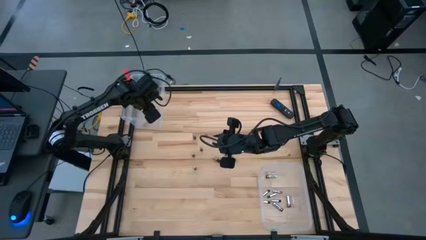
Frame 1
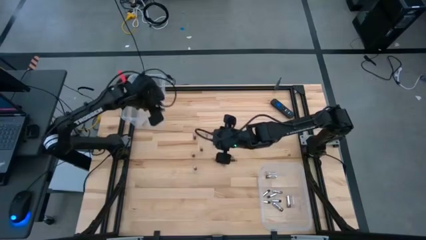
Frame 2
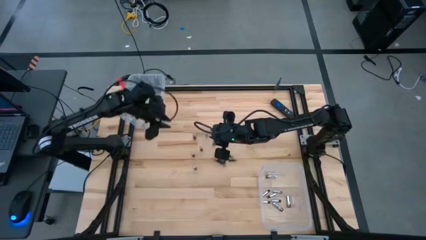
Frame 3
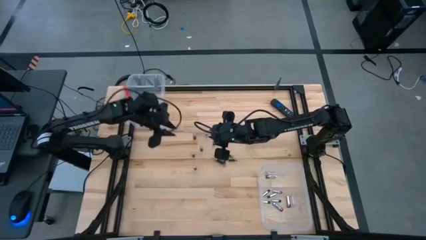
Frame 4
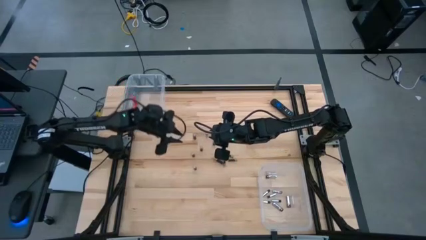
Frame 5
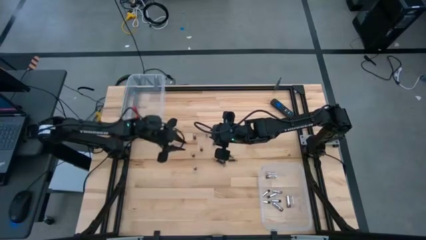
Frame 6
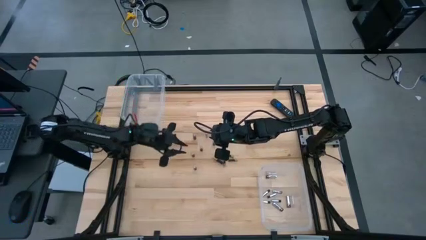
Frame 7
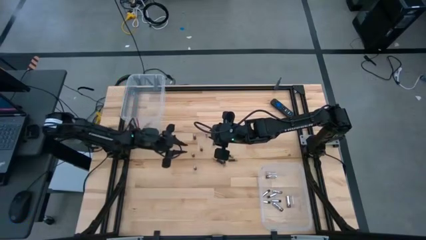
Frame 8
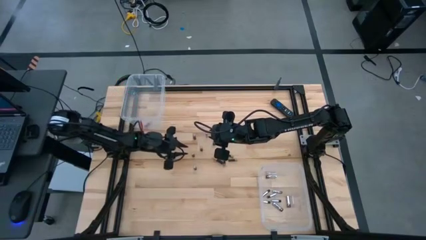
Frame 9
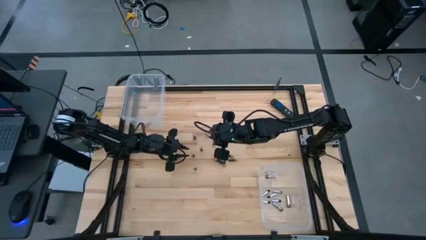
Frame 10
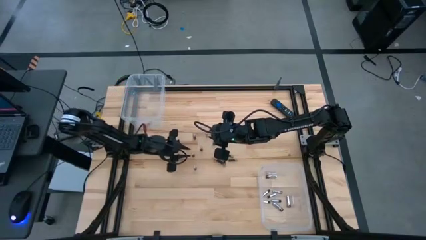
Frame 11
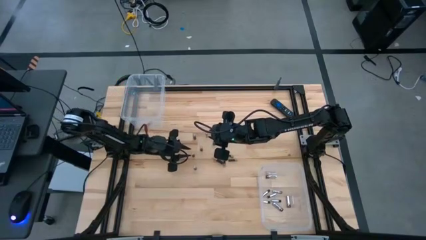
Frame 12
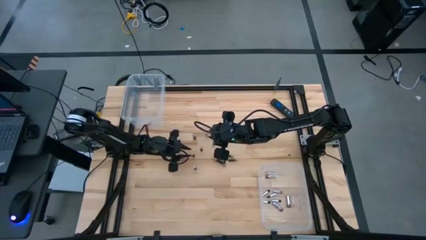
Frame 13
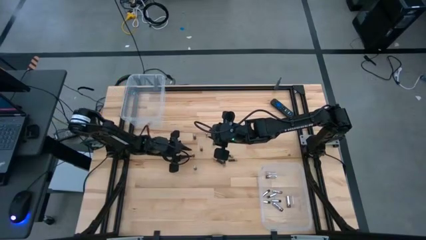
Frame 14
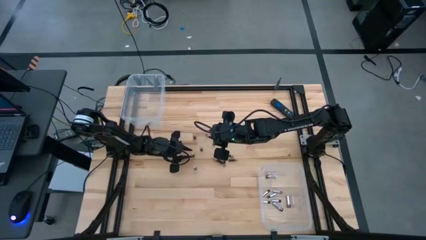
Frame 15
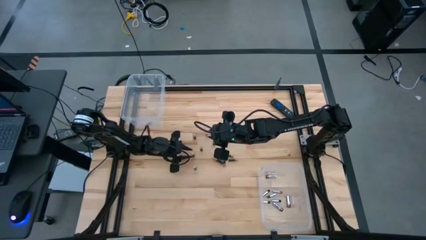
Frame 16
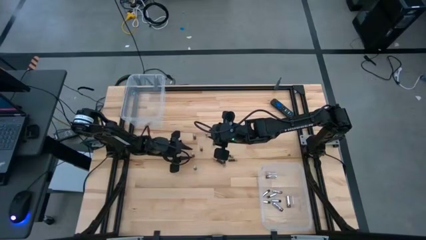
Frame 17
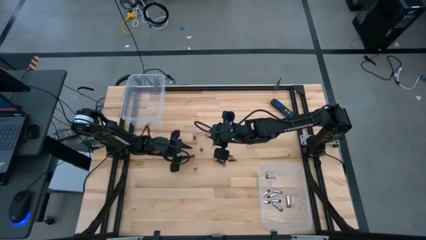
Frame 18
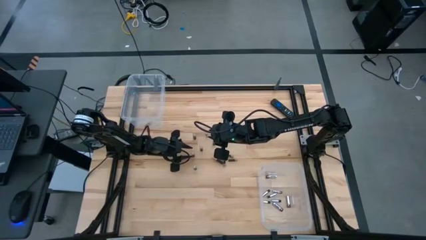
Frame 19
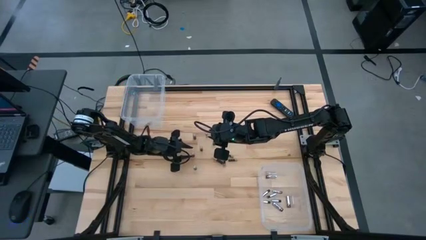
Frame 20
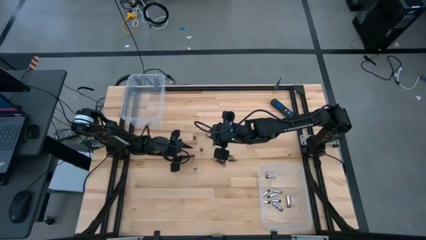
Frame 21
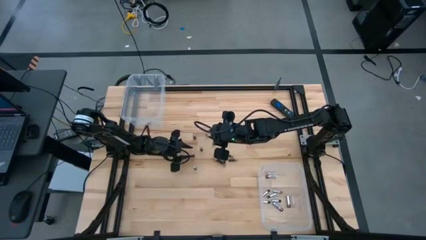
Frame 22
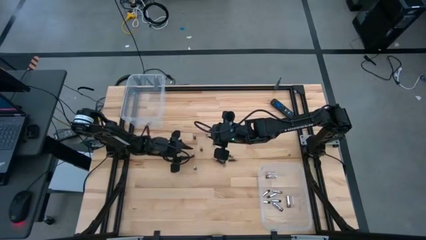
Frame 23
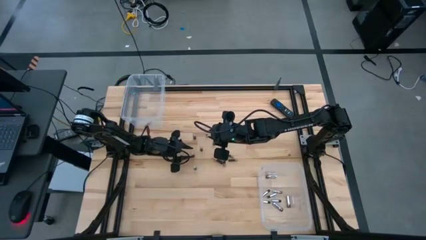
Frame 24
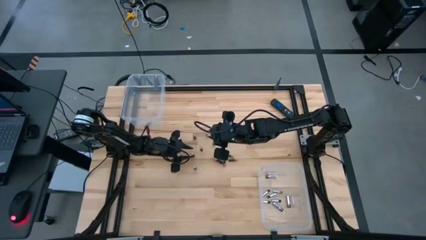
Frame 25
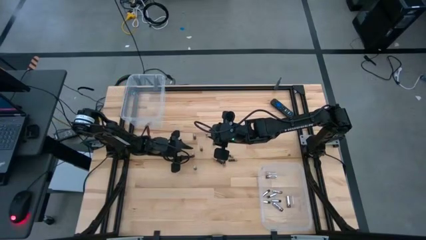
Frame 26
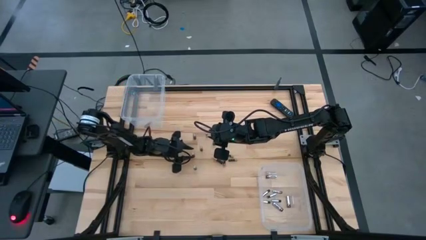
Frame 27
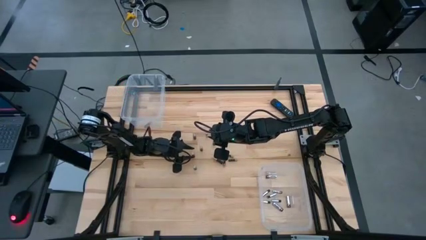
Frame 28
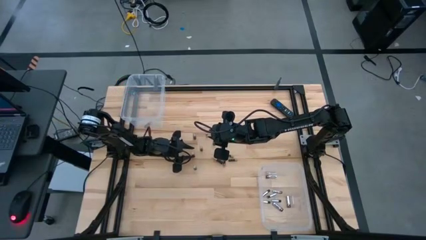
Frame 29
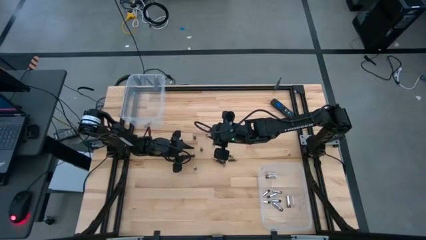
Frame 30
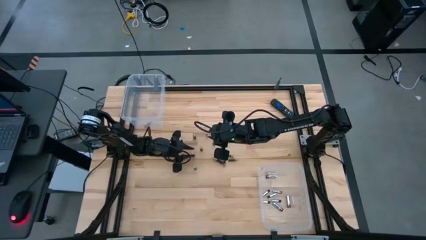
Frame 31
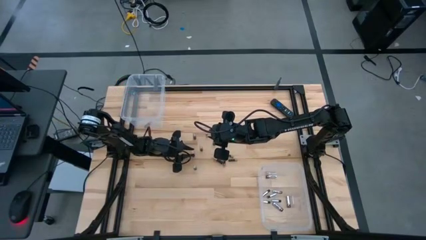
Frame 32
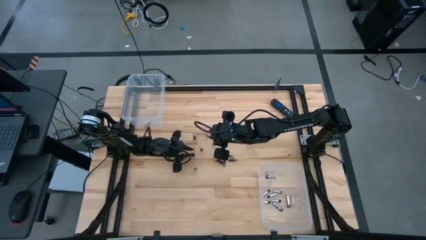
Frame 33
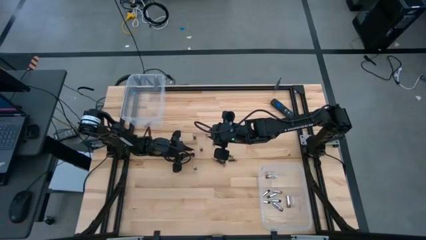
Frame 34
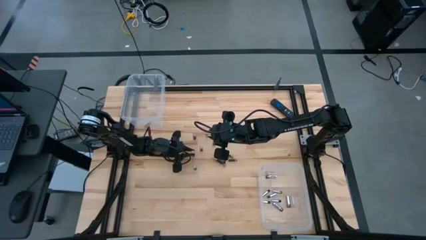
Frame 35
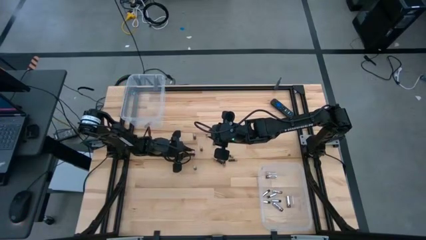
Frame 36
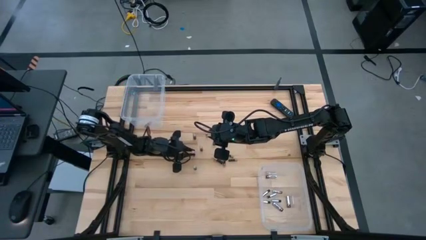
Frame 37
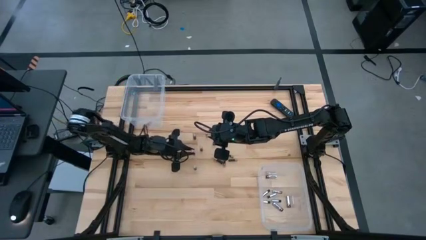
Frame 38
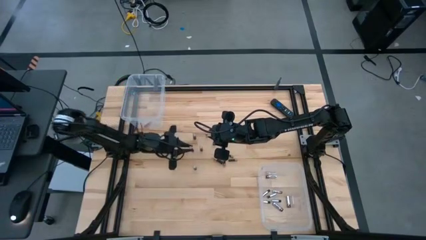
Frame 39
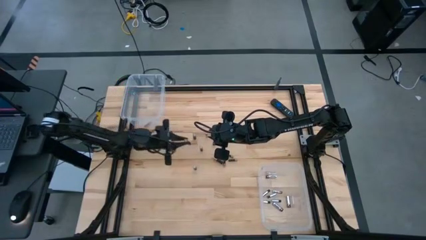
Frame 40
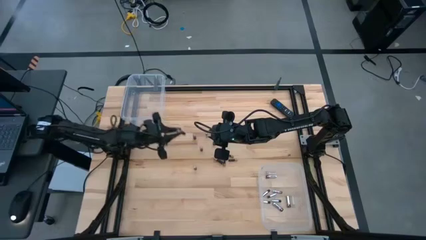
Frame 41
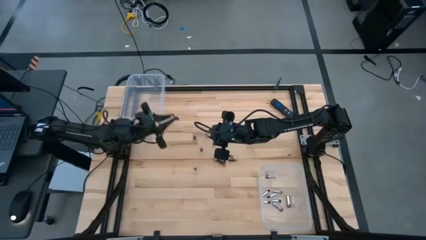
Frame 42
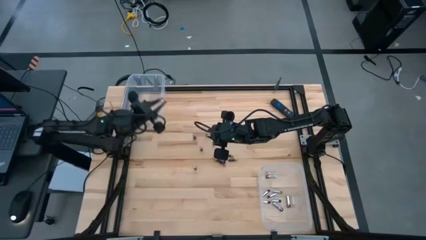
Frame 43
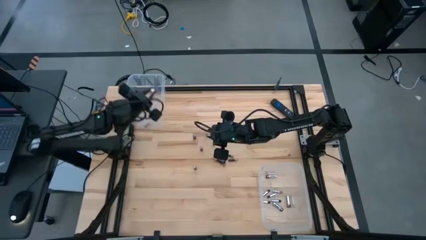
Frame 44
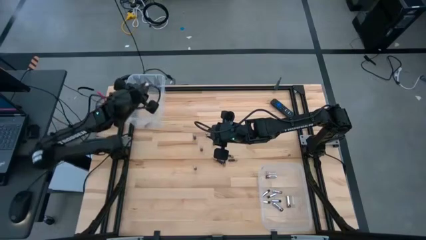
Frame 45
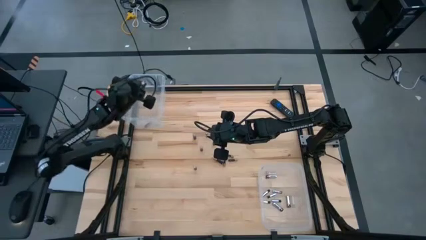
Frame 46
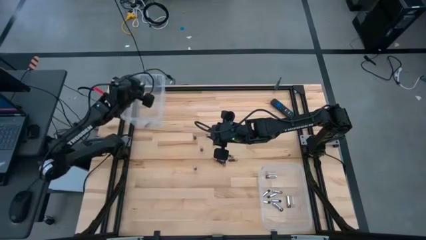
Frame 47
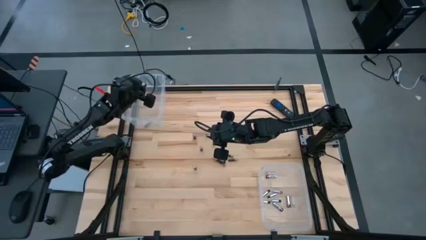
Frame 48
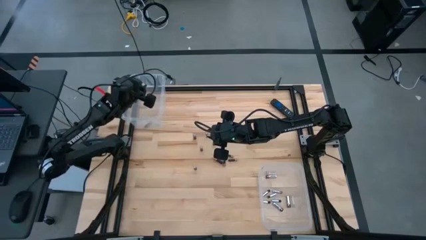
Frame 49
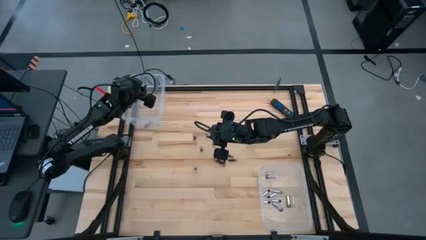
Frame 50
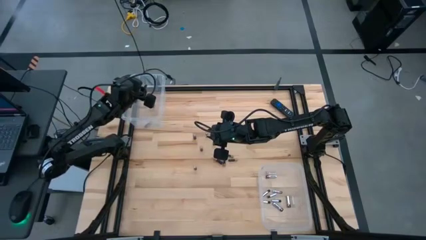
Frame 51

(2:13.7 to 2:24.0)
Task: Sort batteries
Put the black and copper battery into the top transparent bin

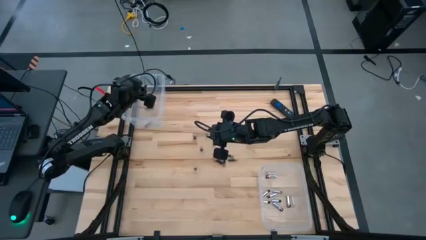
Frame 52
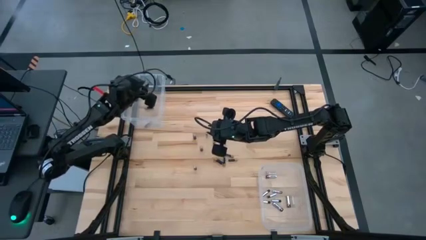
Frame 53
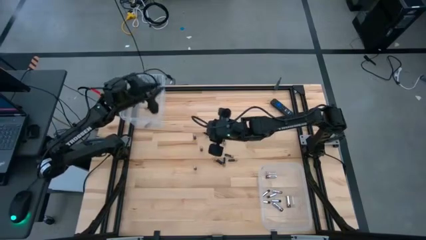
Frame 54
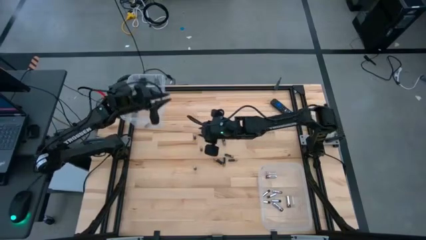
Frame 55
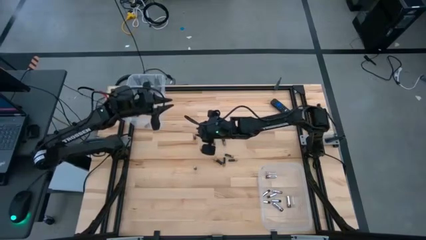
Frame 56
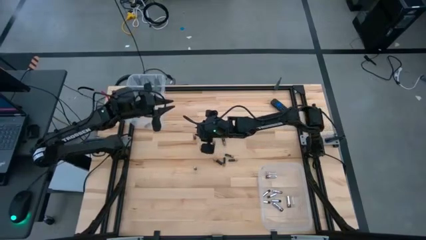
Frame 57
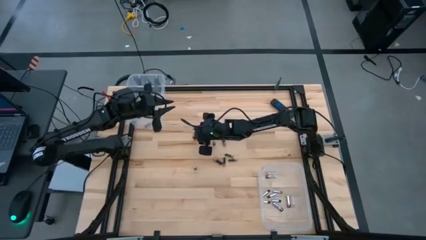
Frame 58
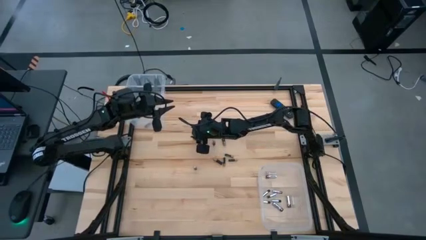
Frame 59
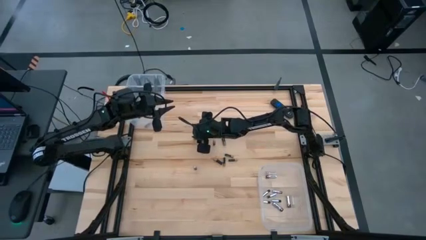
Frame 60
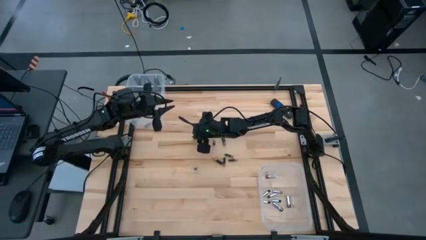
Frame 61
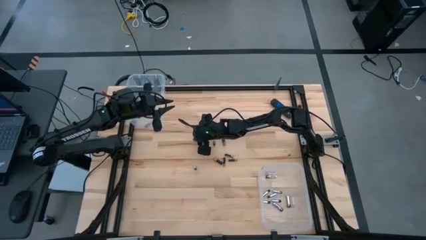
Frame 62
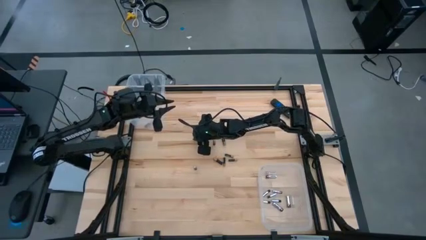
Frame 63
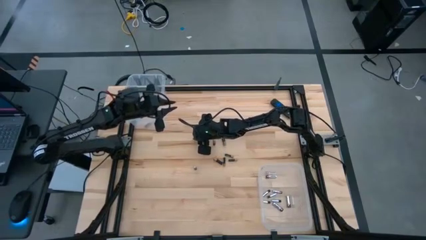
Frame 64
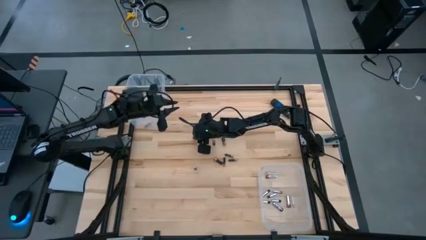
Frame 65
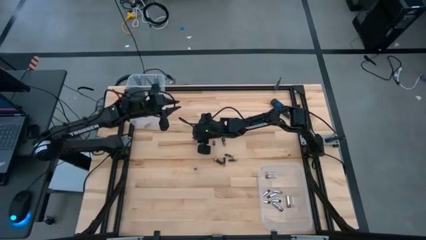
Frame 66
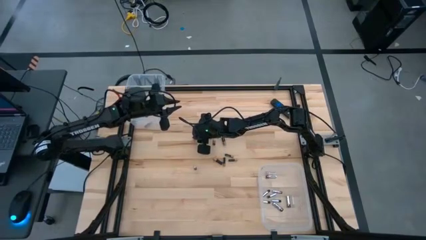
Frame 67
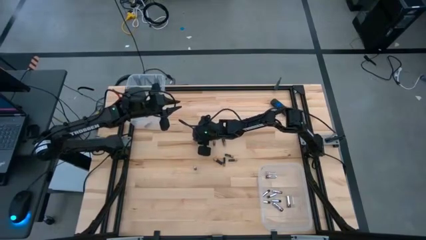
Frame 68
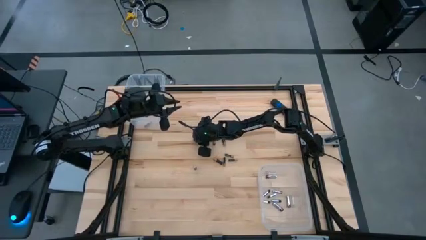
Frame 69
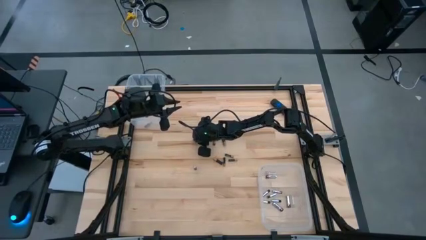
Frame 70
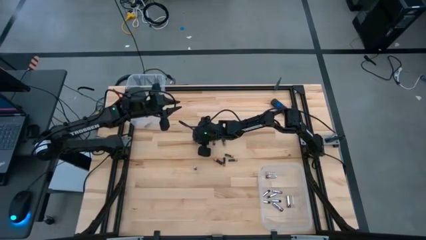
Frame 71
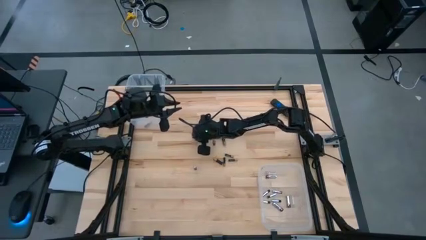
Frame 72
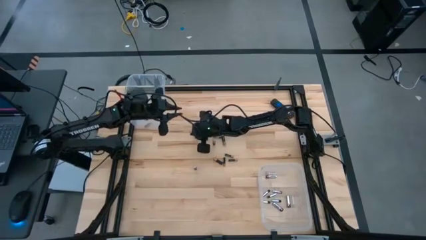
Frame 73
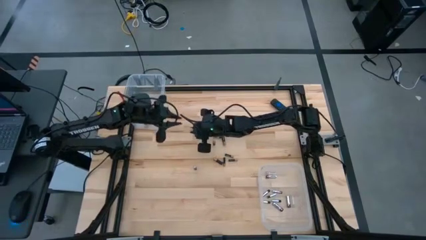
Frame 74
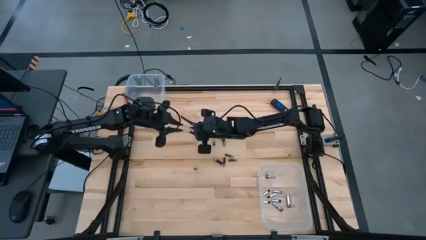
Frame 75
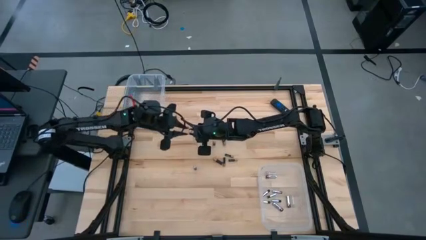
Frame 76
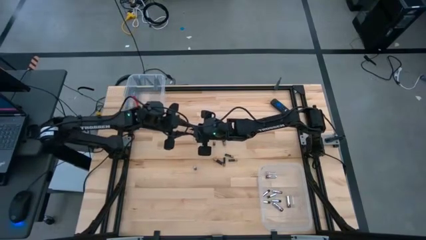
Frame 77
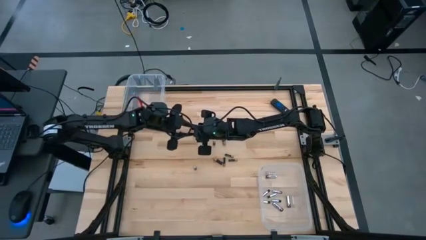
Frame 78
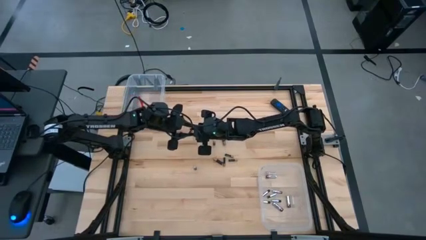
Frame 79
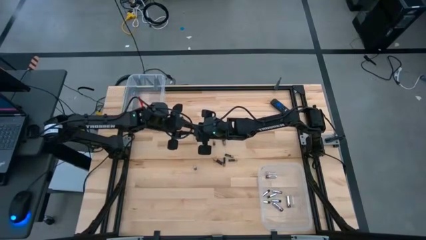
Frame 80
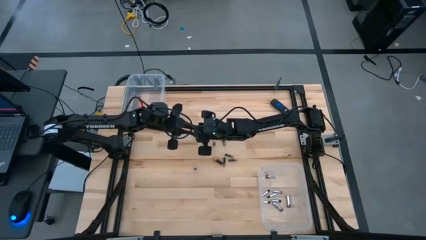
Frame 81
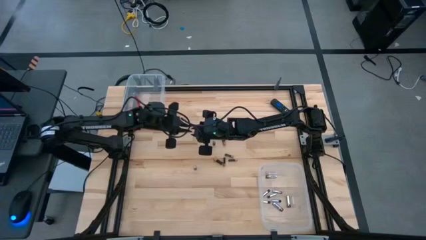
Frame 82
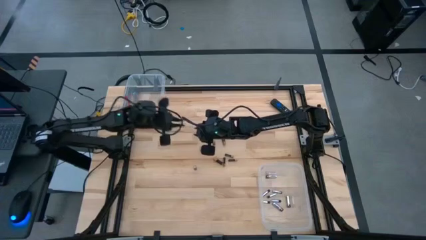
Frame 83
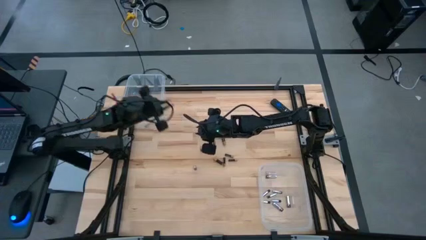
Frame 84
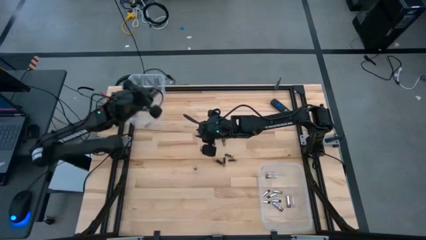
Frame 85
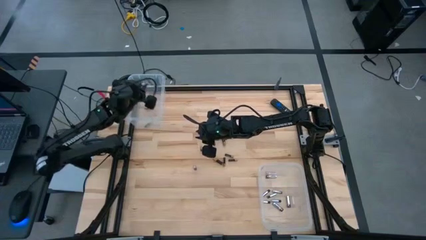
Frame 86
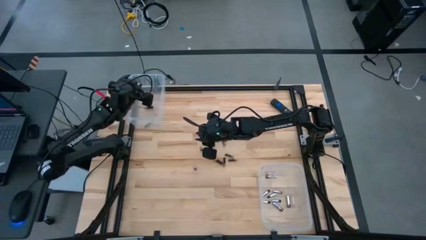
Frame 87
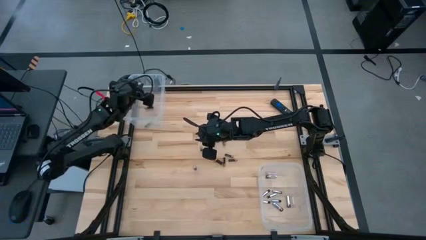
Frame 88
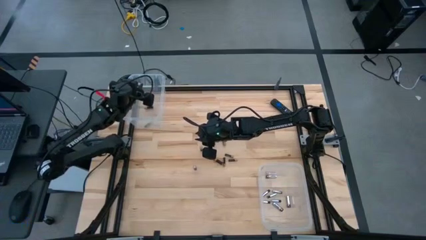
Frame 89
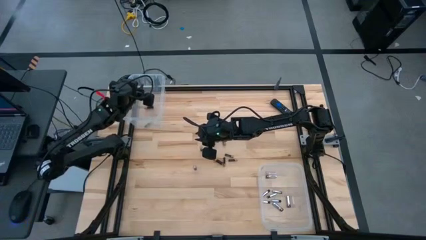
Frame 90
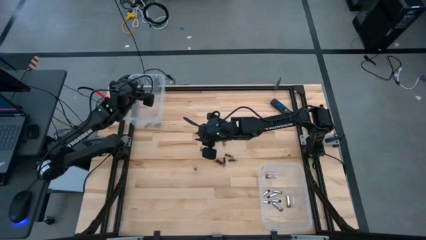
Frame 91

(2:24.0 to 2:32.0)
Put the black and copper battery into the top transparent bin
